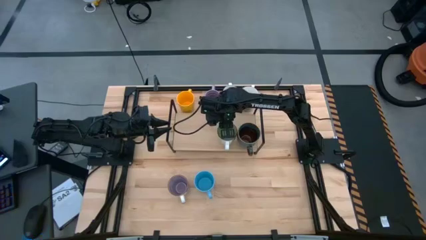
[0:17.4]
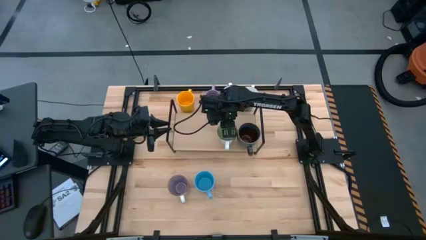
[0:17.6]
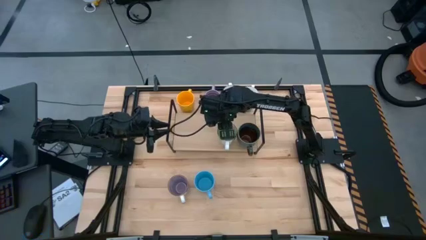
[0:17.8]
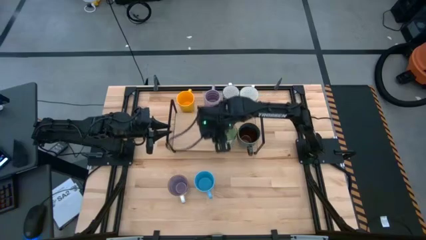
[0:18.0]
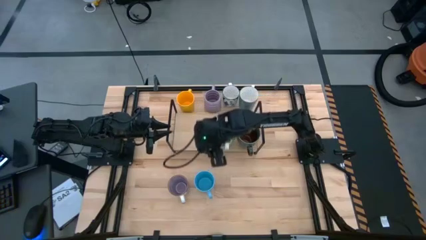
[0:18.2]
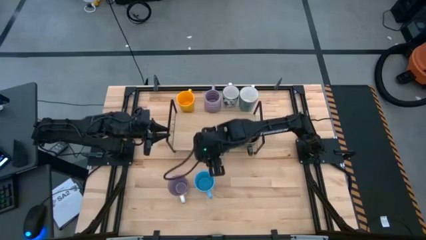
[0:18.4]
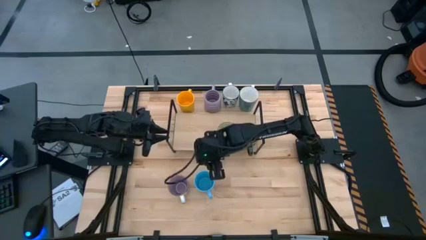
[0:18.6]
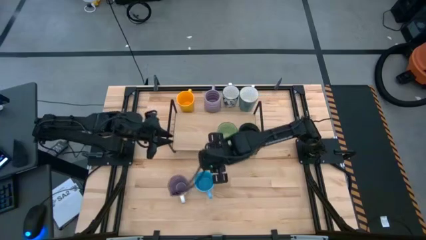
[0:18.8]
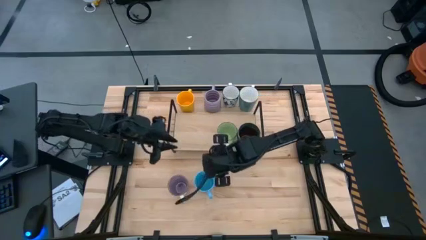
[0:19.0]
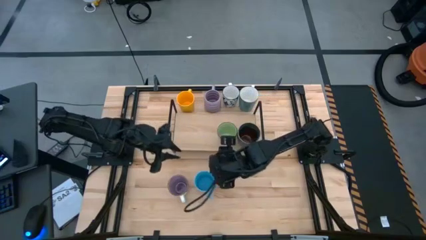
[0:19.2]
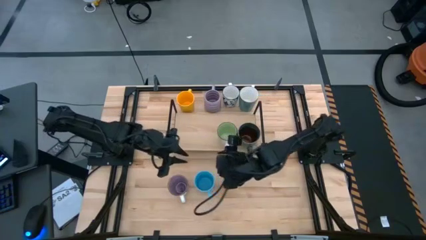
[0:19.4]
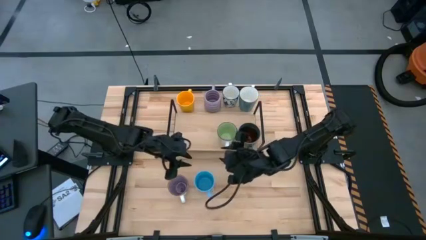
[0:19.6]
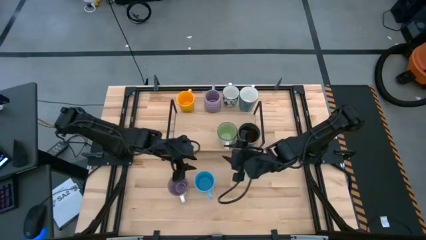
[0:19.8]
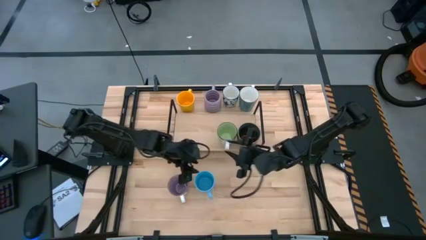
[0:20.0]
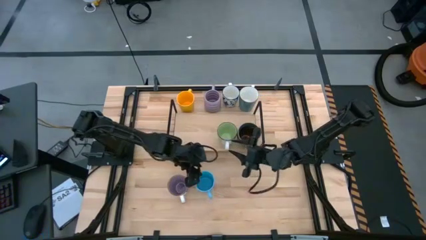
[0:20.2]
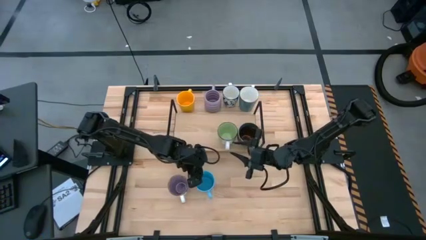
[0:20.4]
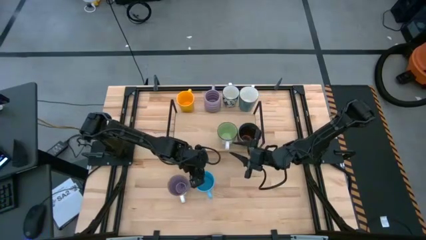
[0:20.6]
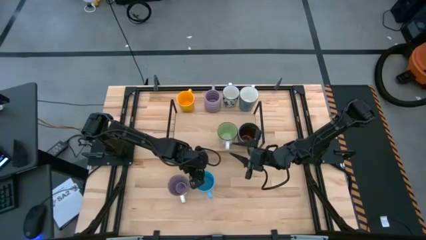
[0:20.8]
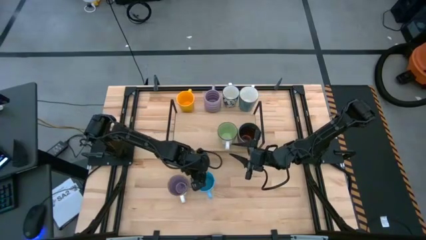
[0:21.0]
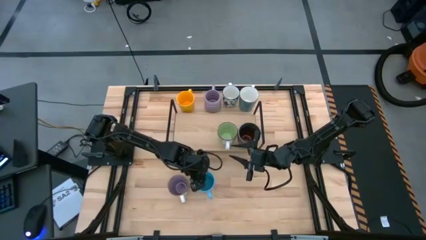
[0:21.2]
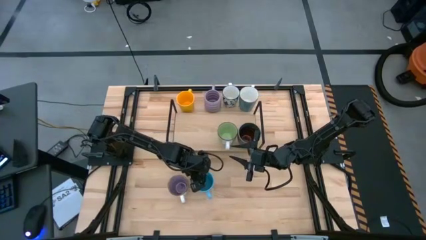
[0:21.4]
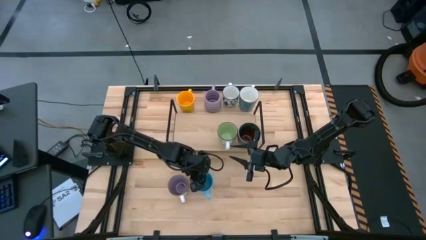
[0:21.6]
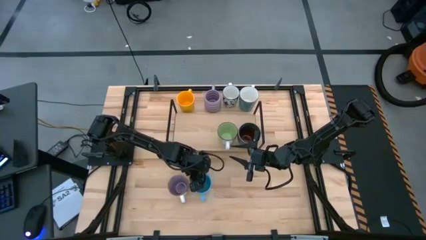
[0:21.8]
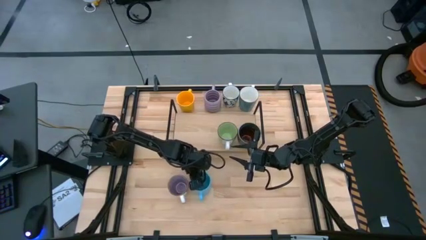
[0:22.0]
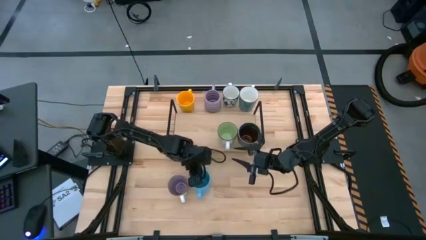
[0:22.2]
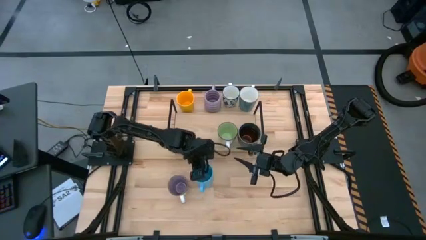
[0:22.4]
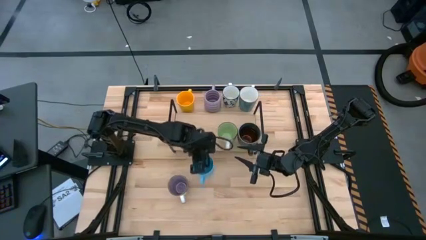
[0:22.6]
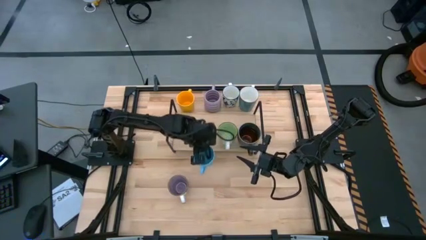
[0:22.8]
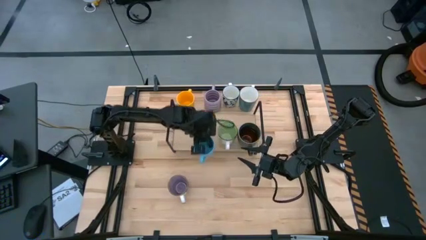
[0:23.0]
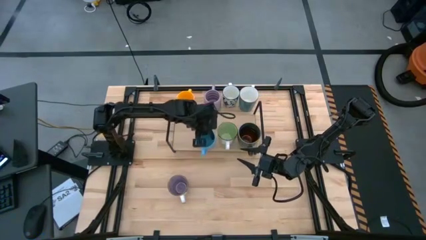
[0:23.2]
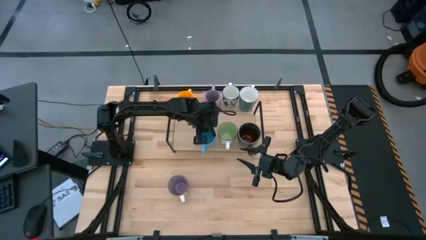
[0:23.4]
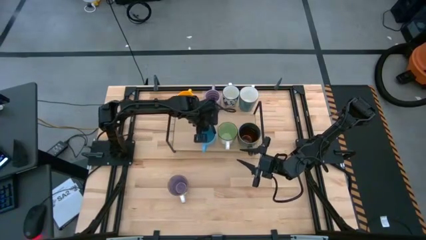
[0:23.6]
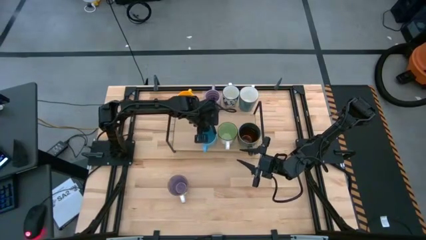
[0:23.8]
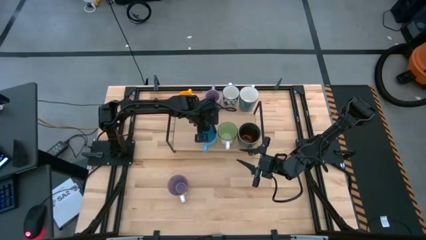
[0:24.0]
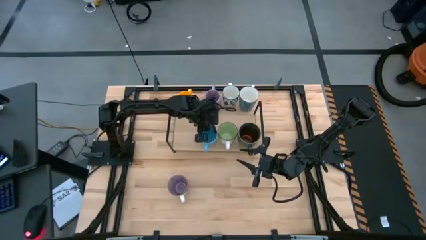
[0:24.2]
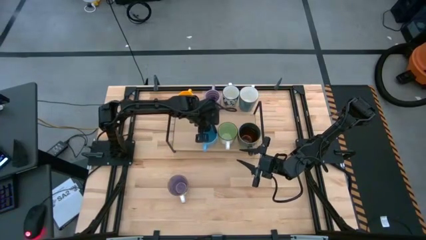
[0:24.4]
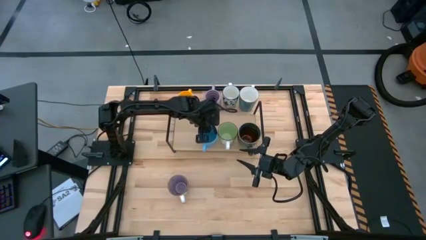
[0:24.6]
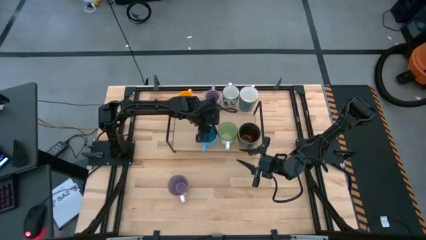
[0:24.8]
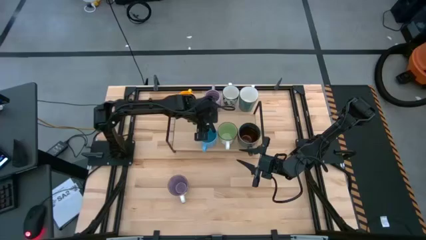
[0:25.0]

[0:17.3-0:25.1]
Task: Place coffee mugs
Put the blue on the shelf

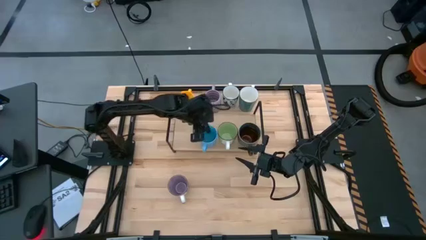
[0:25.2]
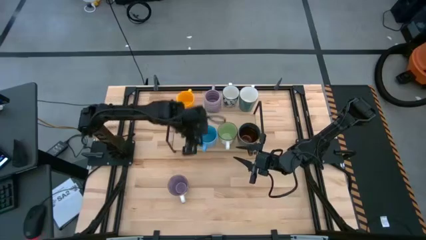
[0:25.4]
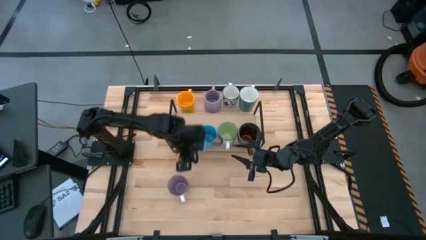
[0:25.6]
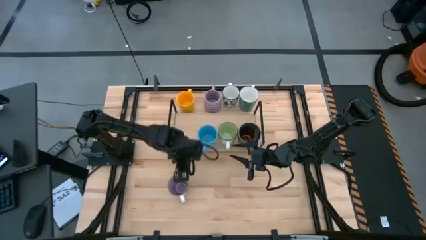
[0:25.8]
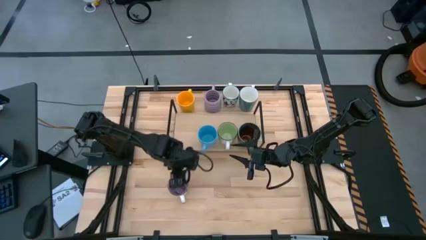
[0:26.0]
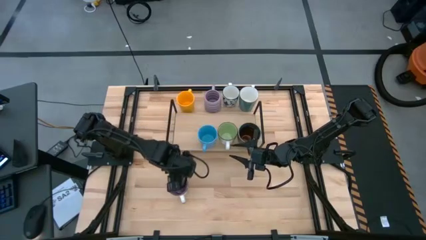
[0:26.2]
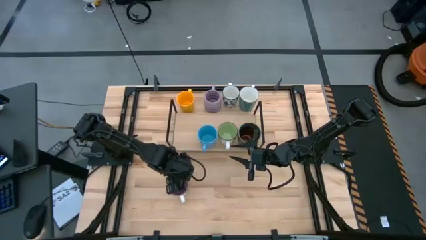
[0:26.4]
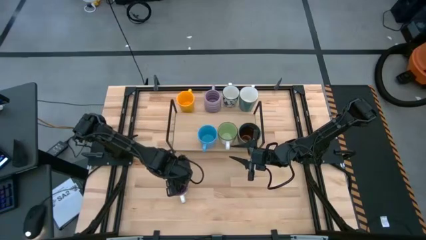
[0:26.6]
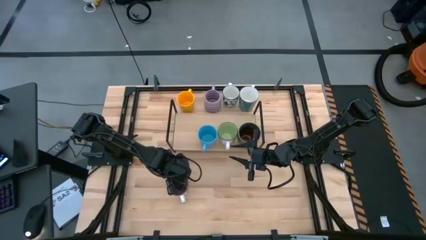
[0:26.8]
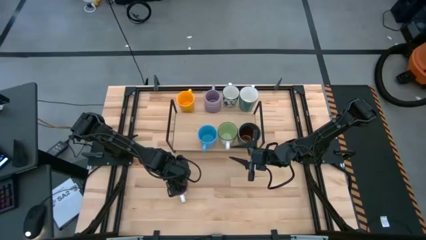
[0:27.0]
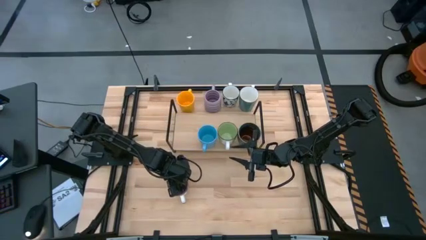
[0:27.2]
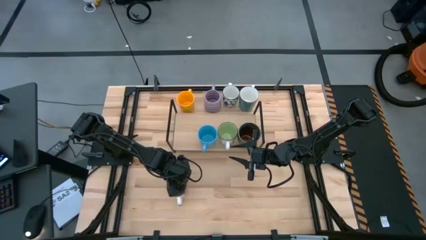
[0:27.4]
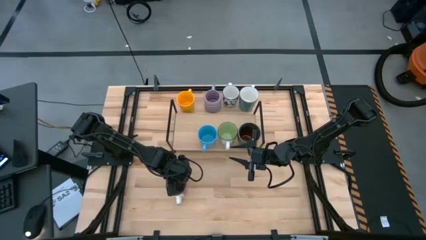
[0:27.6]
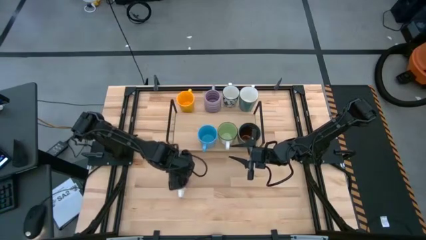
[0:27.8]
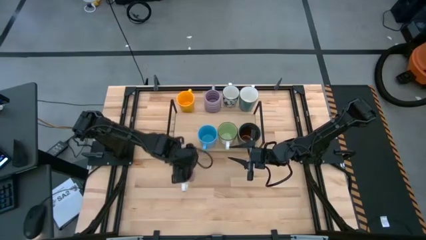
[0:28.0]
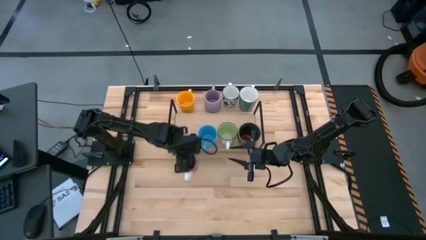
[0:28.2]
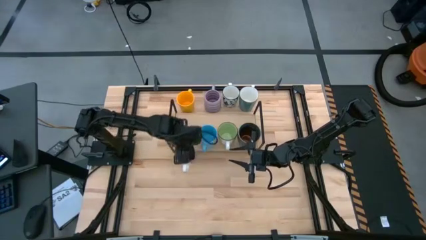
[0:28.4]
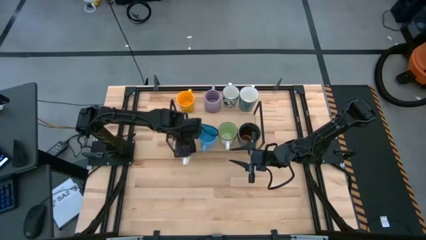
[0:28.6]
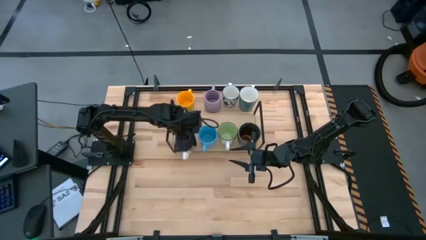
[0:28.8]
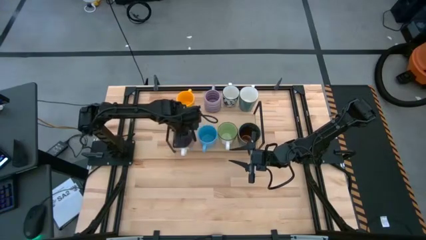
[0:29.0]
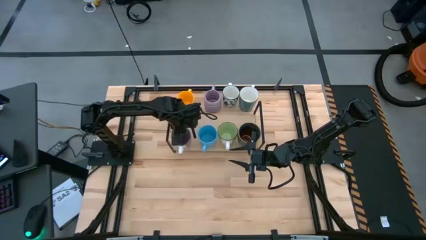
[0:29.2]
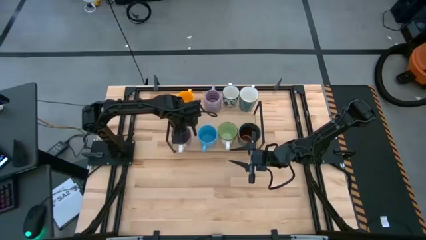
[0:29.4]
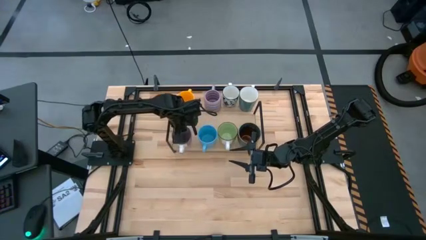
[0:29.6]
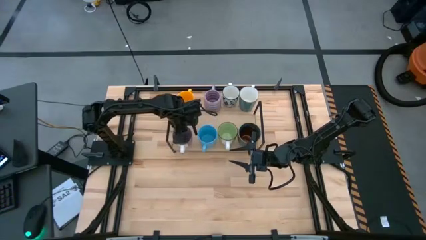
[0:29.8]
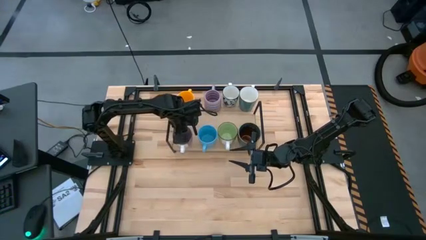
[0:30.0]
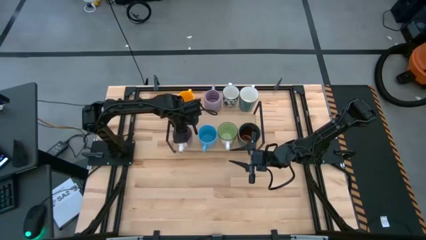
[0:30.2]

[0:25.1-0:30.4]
Put the bottom violet mug on the shelf

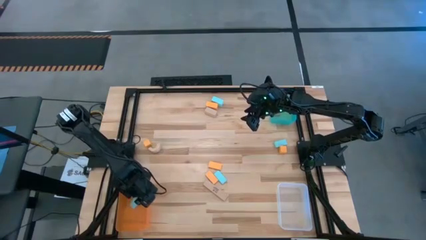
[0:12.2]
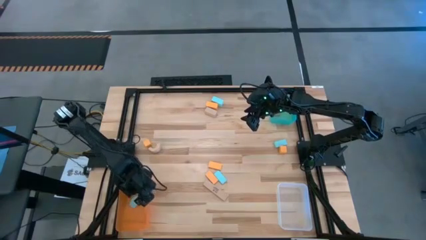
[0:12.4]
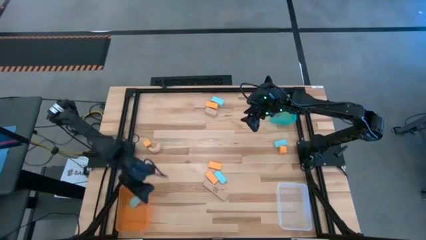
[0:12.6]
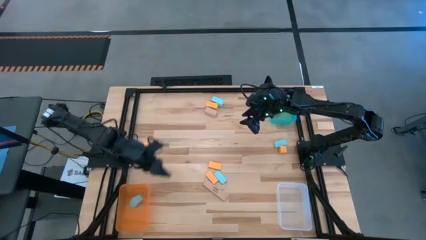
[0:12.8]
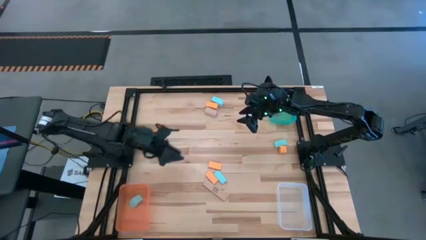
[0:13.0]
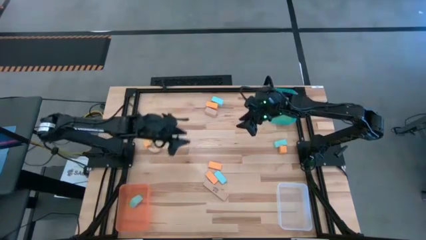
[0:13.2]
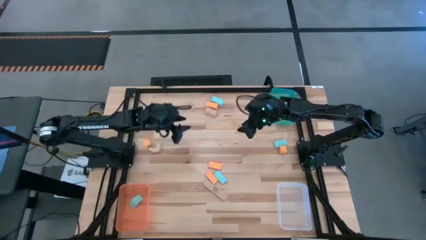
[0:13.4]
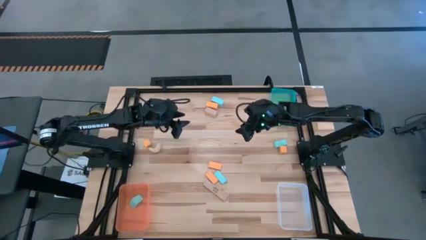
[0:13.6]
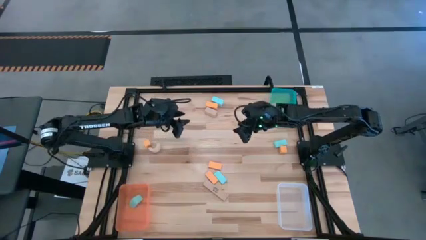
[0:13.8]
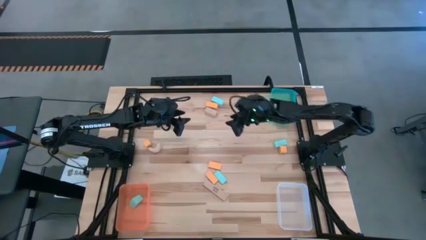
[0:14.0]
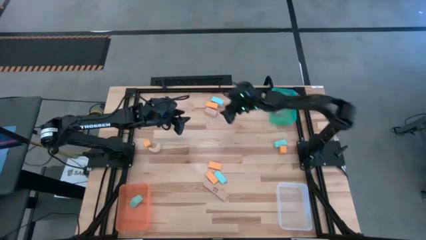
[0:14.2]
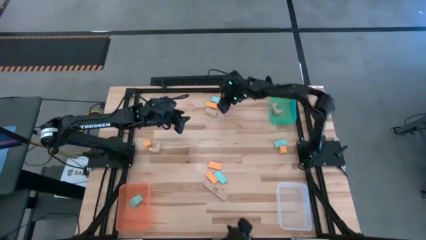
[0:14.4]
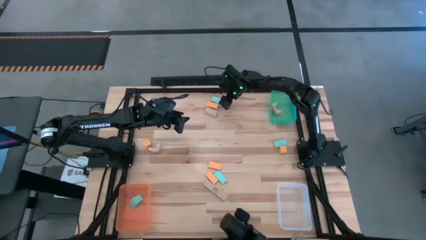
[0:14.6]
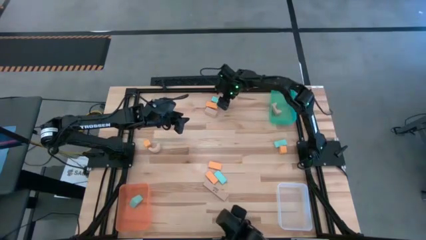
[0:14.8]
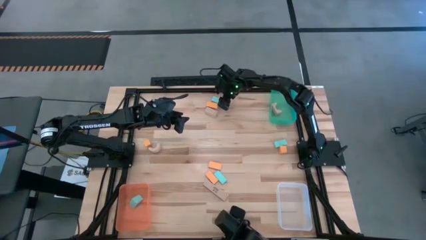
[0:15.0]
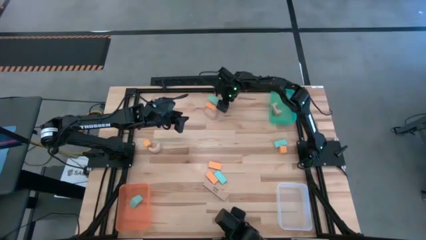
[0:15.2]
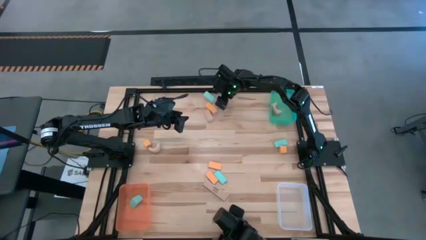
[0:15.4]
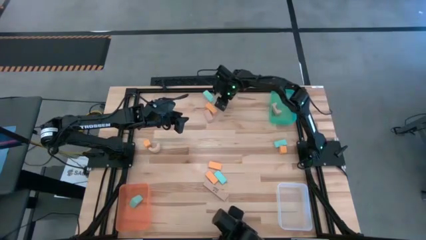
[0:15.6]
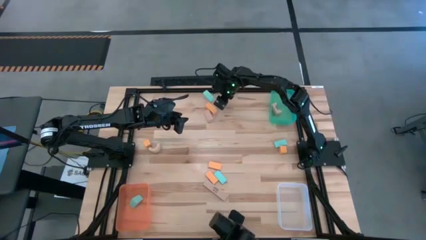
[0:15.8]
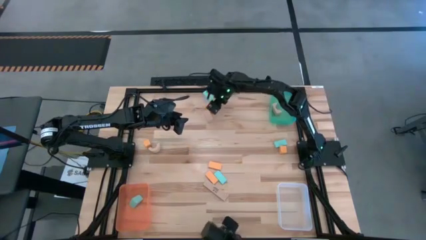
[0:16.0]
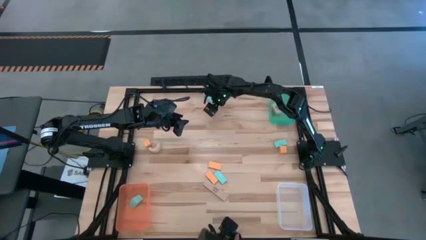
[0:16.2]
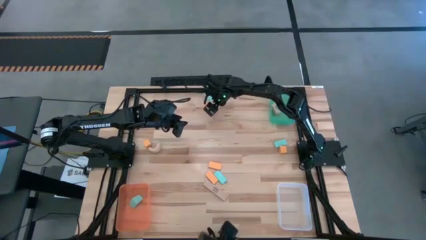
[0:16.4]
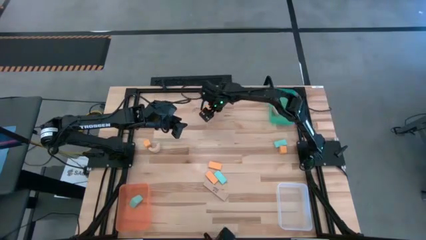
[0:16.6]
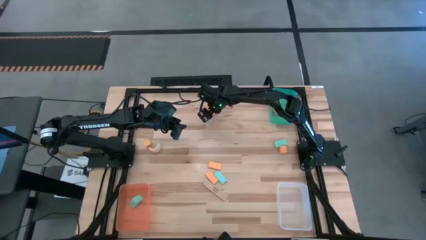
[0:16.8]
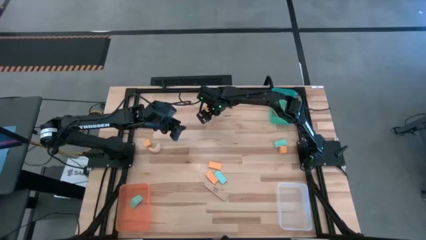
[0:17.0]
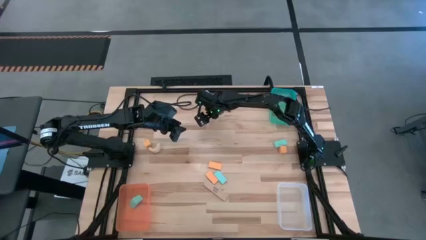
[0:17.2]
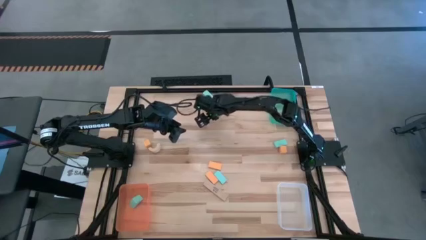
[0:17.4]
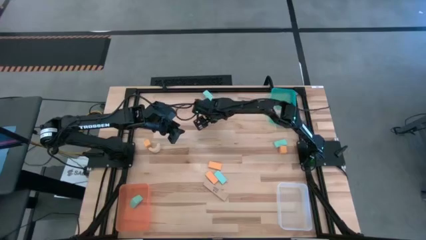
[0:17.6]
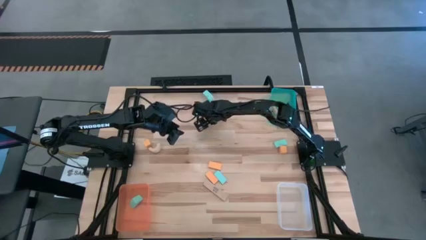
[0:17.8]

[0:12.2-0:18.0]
Task: Sort & place blocks by color
Put the brown block into the green bin
